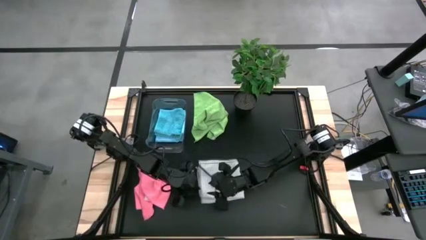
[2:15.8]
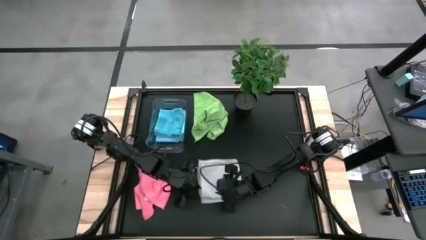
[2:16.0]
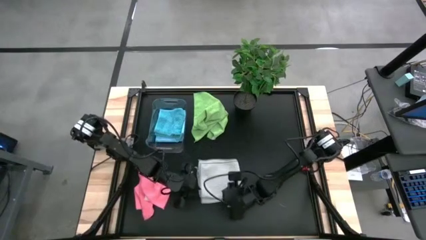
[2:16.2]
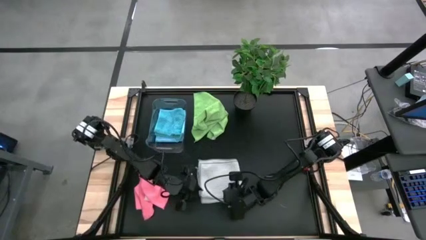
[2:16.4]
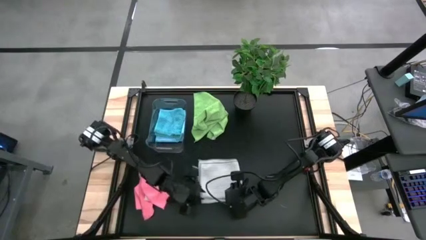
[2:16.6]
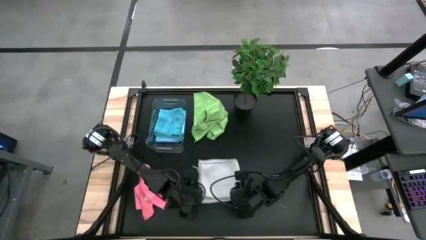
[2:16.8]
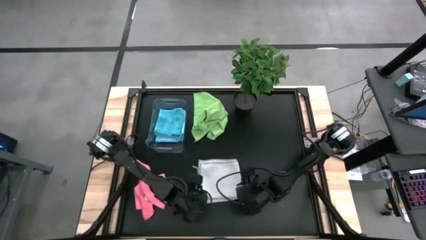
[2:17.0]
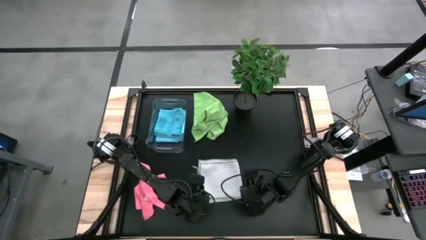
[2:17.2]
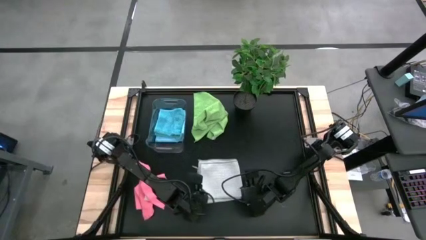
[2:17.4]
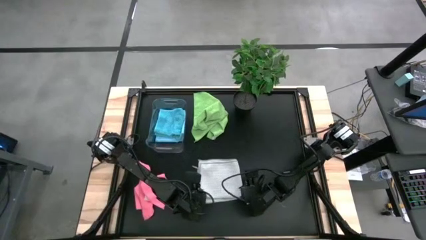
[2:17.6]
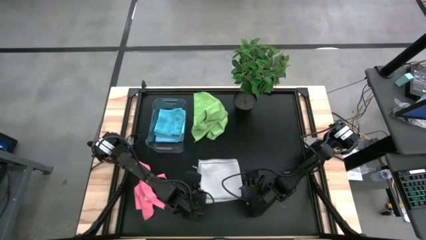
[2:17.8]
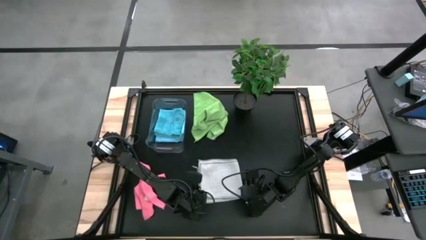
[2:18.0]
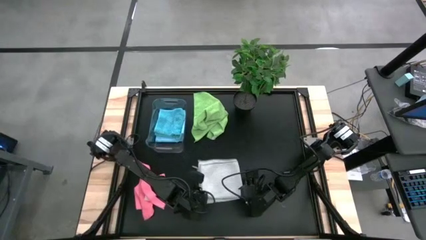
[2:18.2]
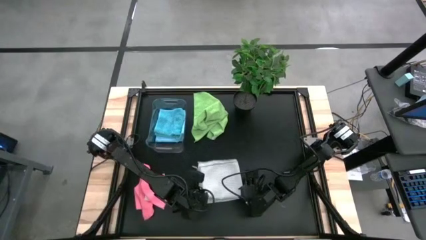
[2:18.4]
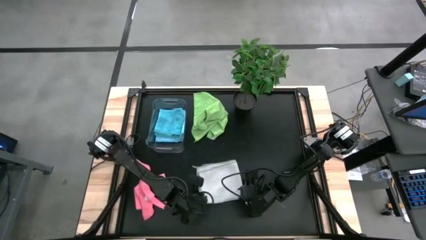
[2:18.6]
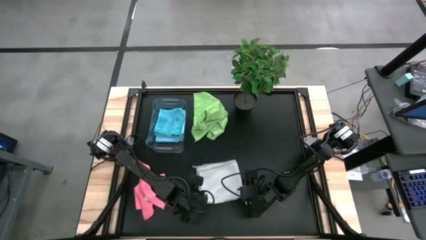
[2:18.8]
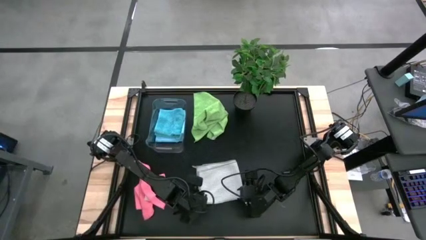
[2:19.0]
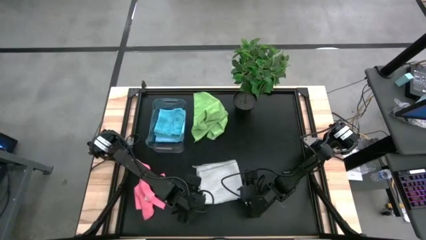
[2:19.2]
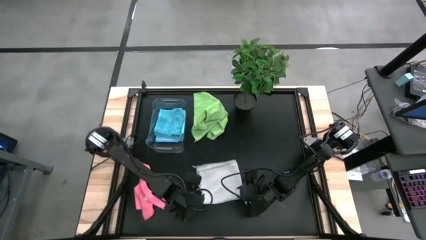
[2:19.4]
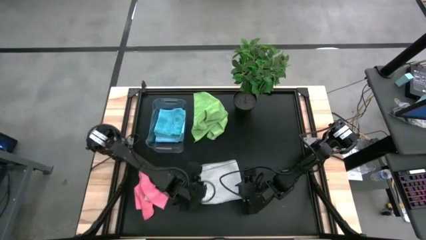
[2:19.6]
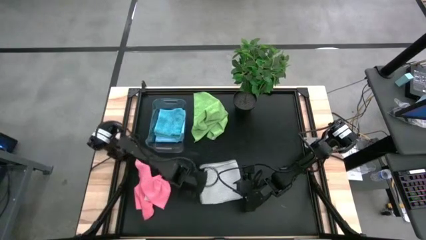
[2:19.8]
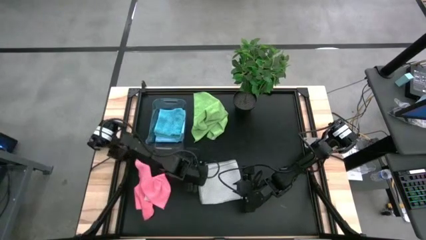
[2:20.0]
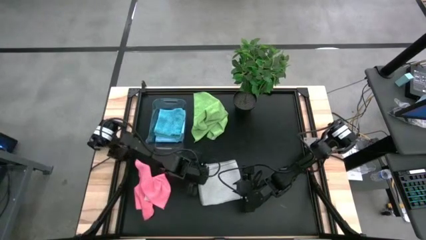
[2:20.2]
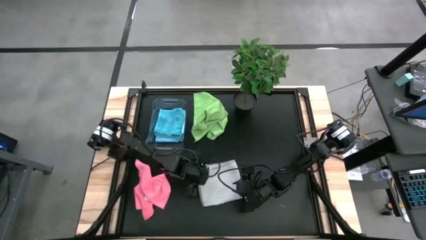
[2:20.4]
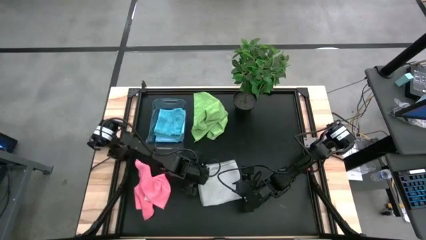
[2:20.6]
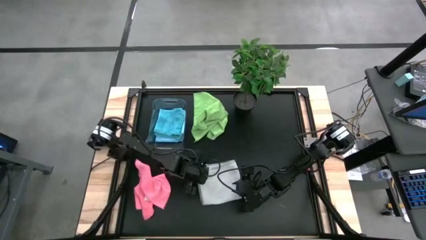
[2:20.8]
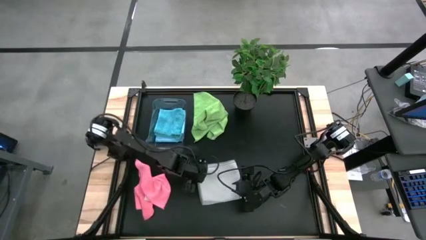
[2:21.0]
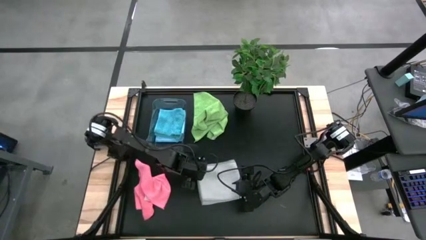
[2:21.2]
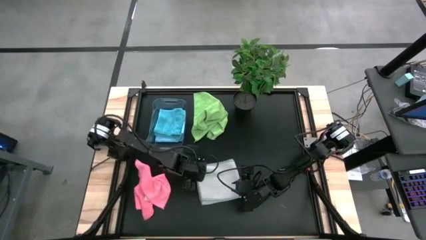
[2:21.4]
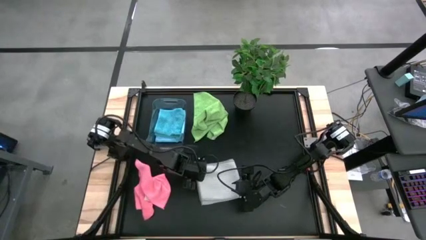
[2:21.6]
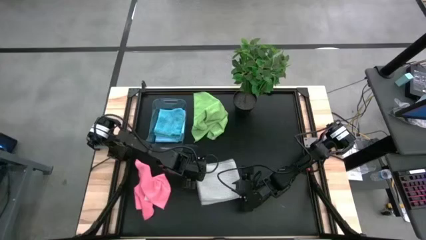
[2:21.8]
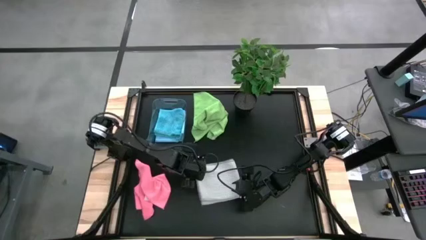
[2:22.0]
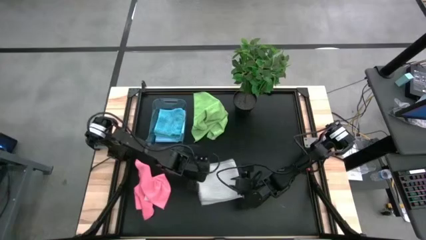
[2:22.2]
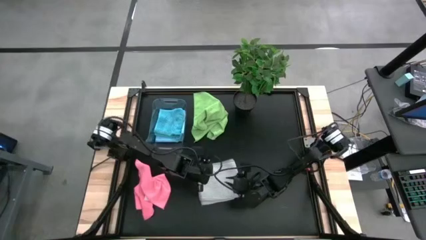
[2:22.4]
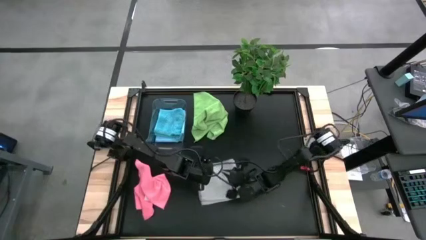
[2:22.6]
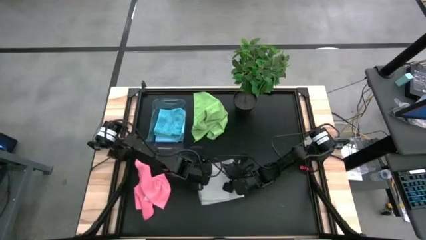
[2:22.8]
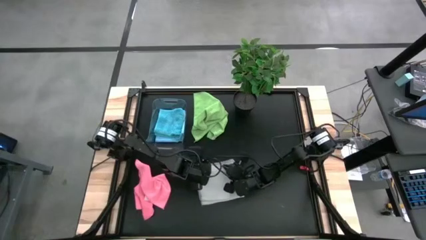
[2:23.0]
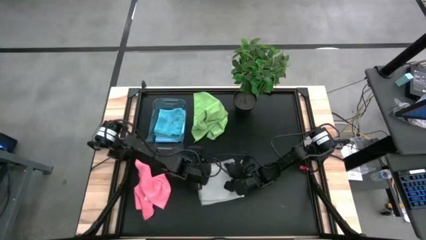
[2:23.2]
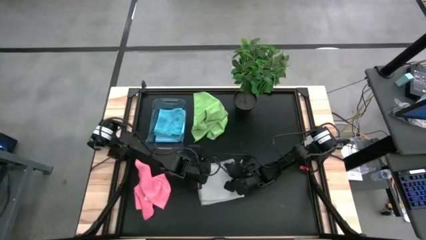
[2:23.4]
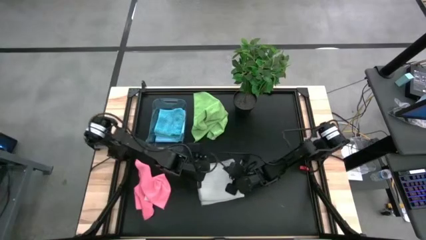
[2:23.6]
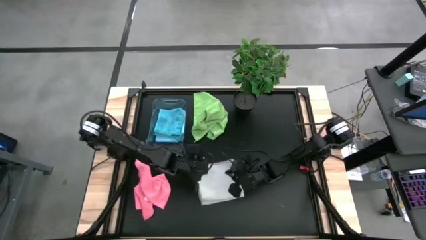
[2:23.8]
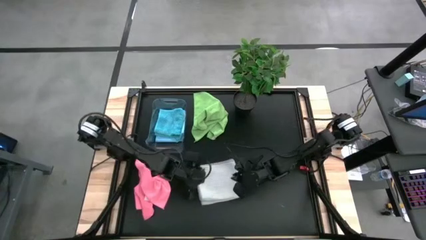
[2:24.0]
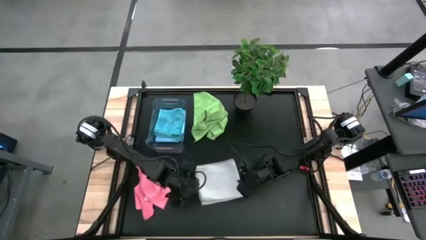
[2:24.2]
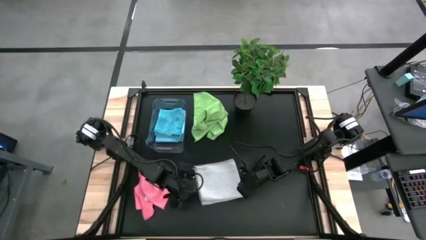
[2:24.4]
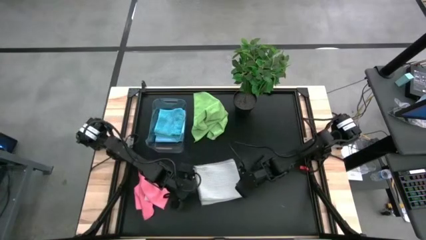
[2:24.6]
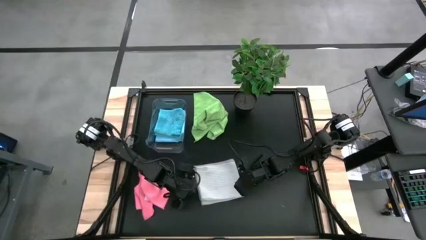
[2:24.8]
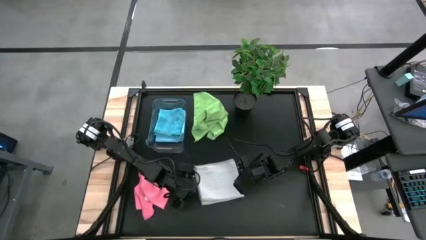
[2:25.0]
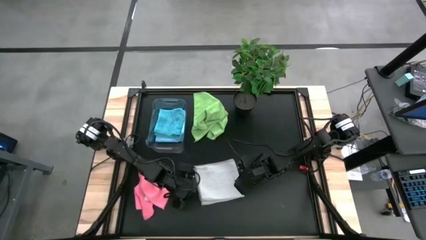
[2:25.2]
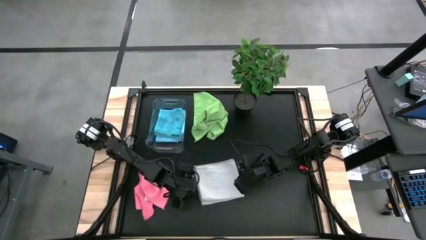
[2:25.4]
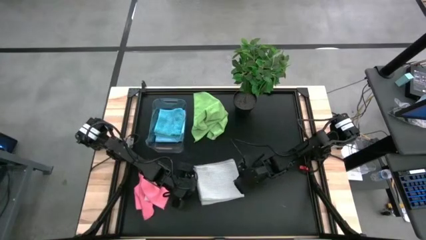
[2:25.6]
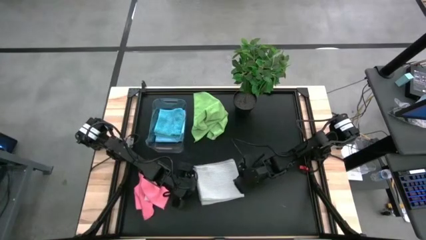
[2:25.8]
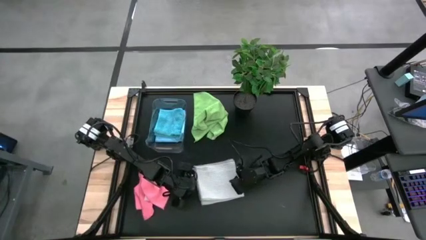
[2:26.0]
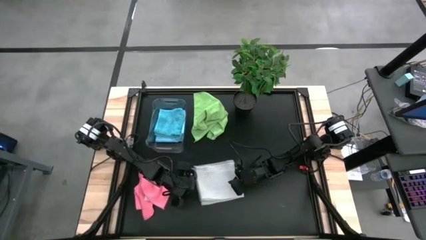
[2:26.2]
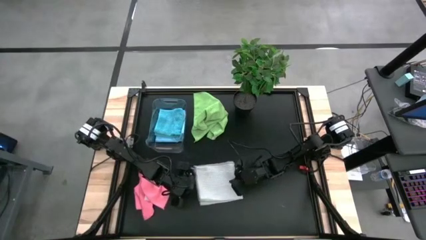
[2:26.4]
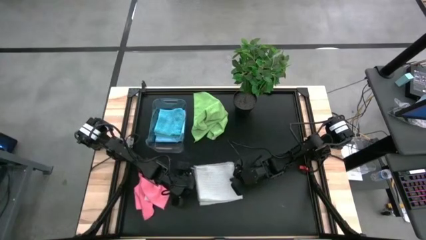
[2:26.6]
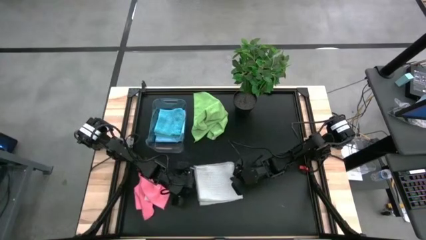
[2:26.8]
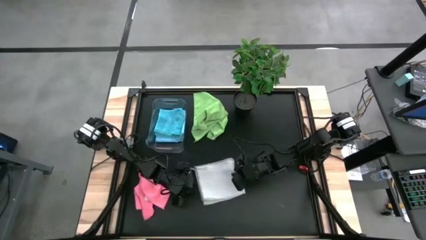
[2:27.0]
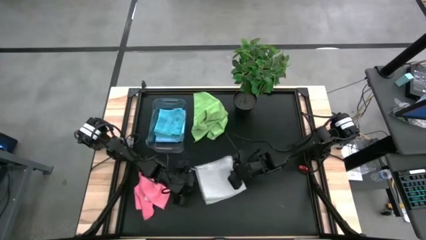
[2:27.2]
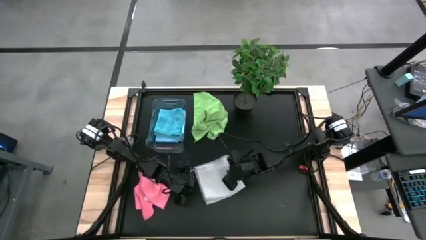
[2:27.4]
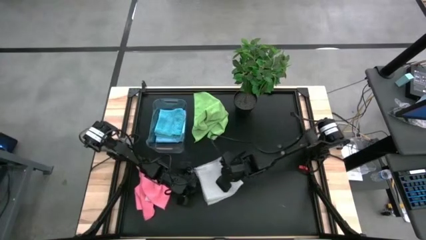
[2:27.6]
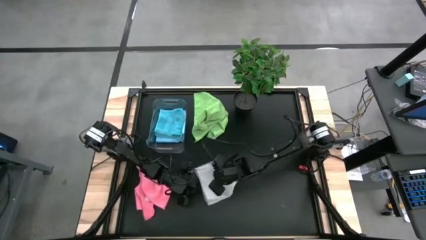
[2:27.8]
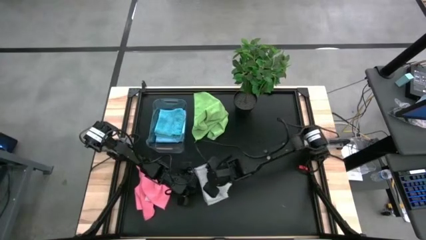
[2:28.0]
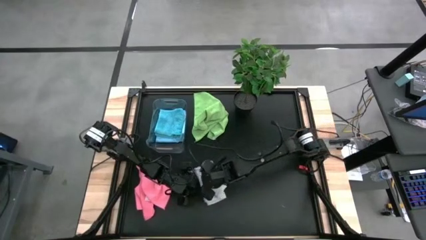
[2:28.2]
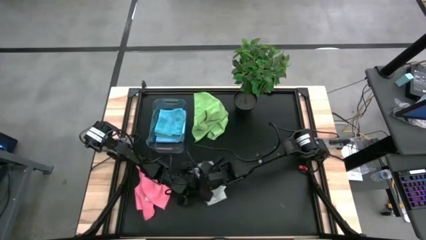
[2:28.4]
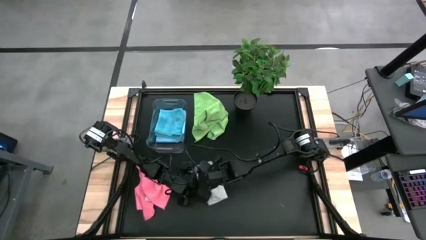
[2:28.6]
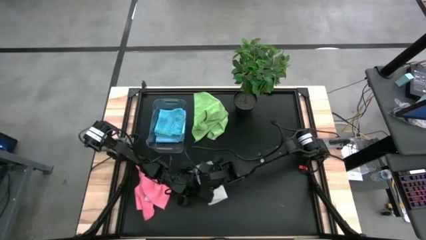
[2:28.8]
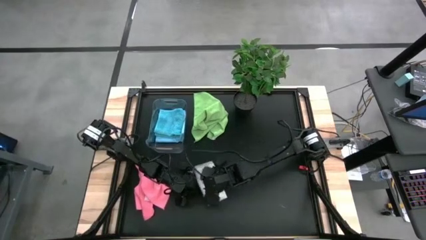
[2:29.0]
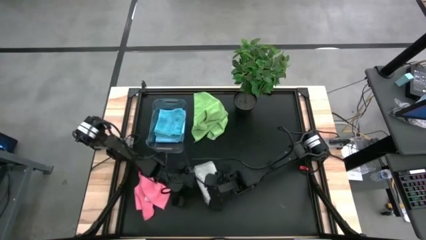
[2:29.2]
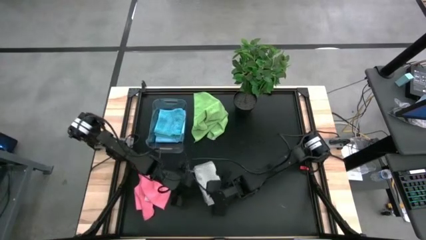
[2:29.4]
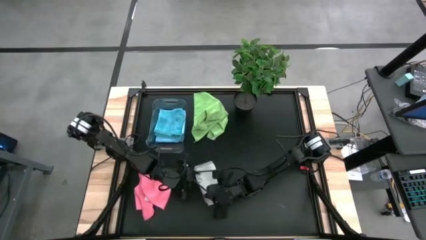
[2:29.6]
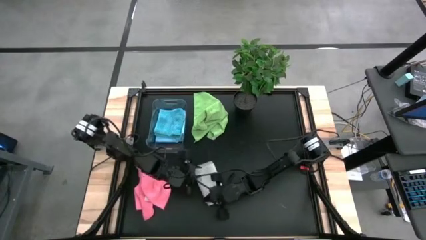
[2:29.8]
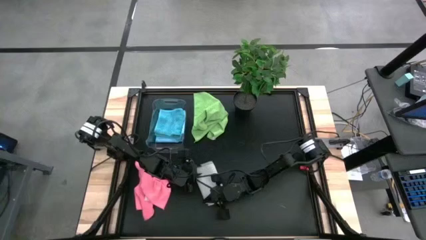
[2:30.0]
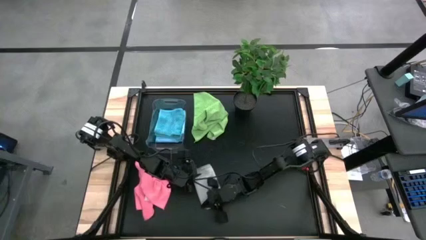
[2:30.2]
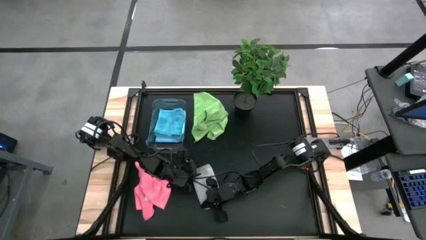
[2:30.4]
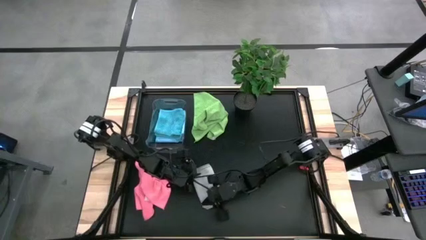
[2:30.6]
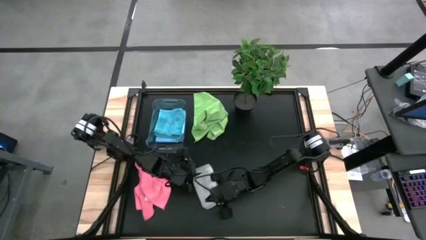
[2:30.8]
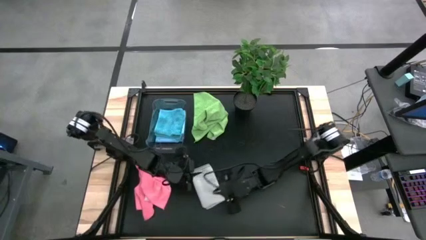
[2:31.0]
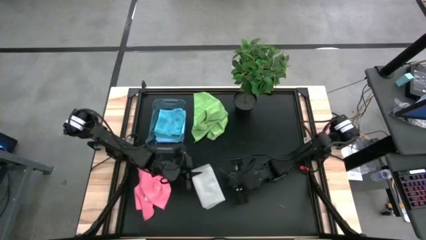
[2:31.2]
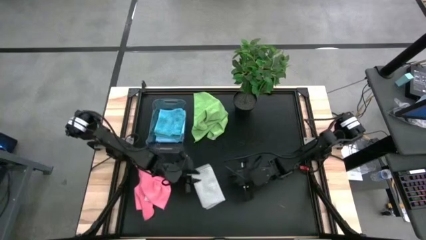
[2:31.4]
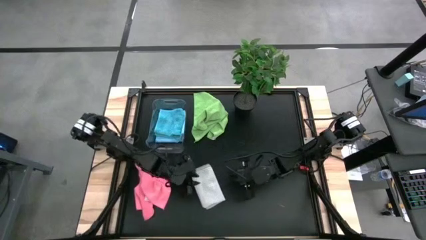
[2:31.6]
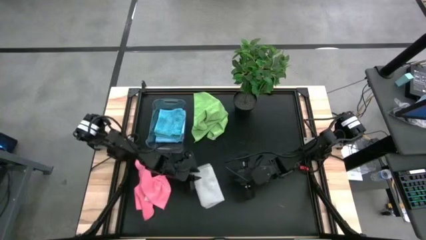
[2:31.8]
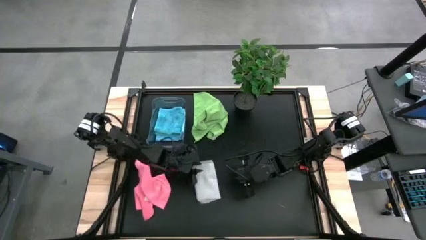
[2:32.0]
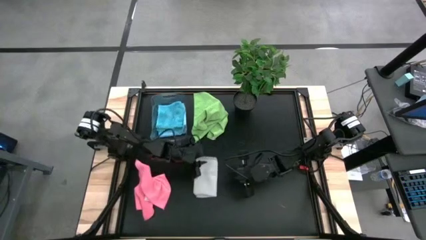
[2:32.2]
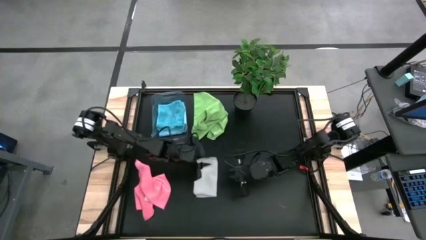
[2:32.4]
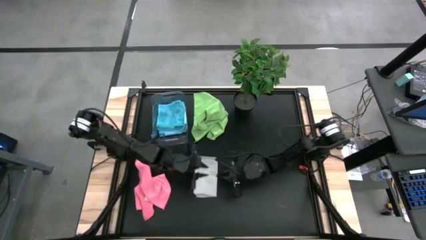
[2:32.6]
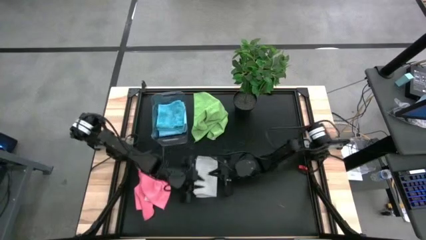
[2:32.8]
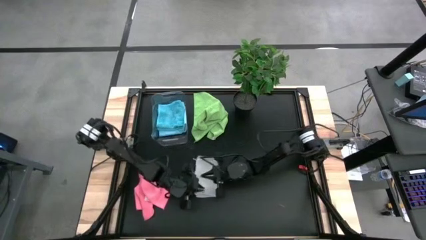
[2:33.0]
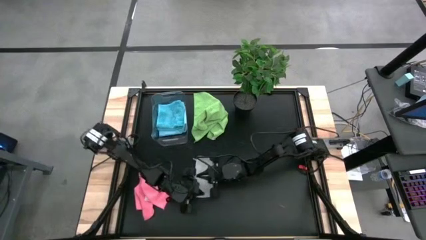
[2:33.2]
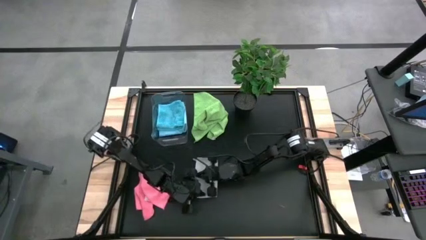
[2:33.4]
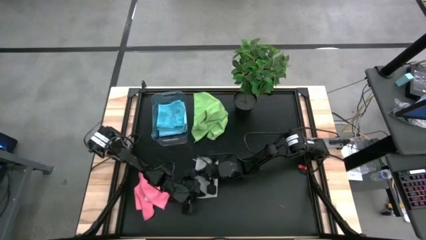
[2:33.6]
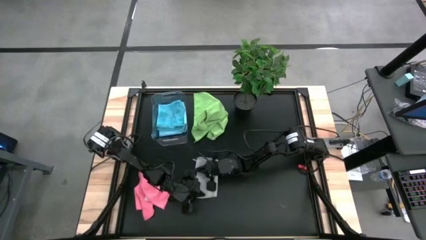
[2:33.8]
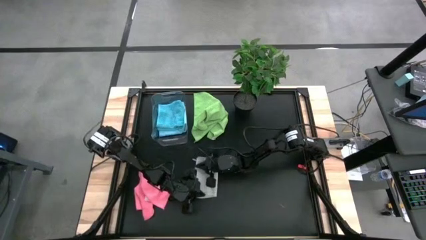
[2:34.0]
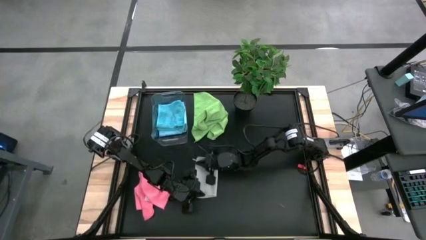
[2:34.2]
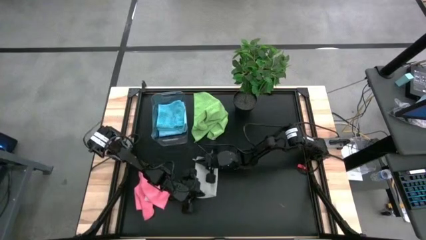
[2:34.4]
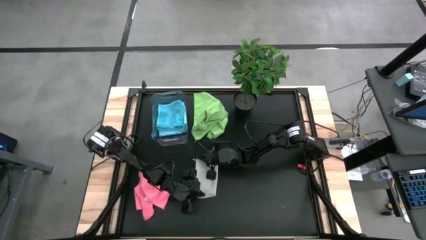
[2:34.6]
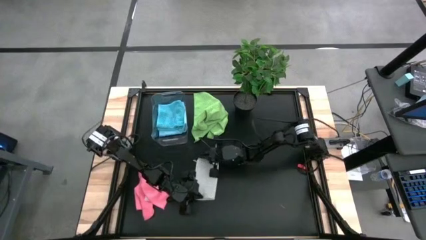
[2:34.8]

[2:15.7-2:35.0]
Task: Fold microfiber towels
Fold the white microfiber towel
